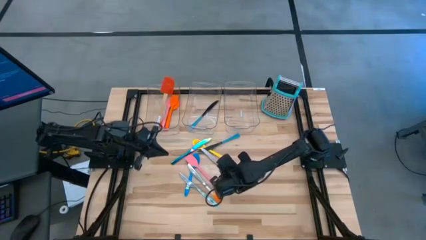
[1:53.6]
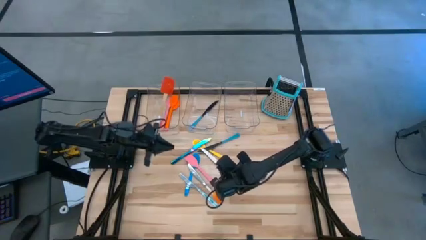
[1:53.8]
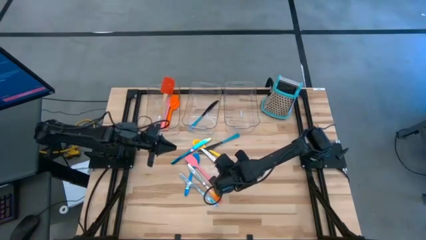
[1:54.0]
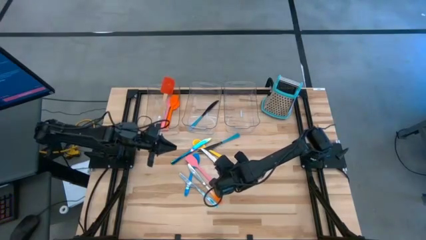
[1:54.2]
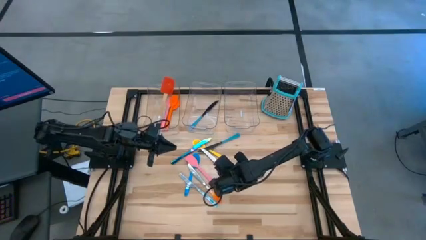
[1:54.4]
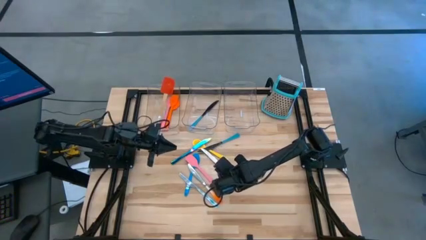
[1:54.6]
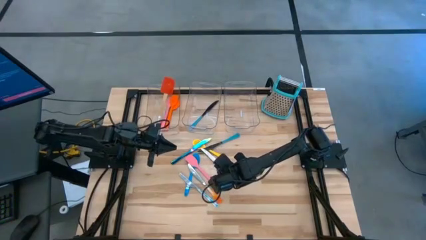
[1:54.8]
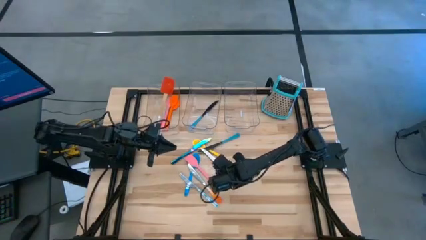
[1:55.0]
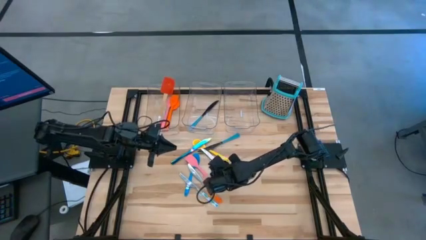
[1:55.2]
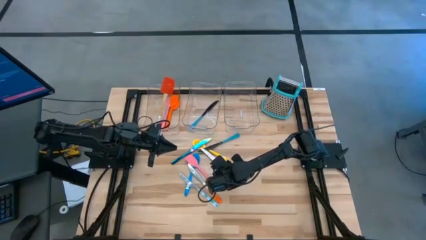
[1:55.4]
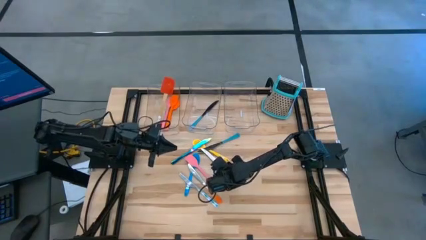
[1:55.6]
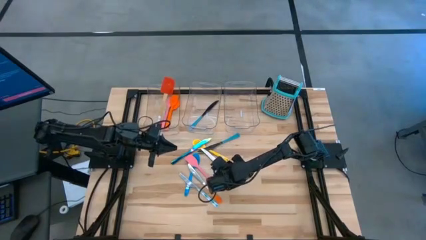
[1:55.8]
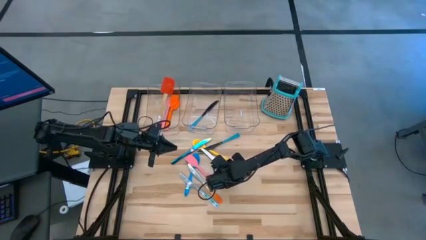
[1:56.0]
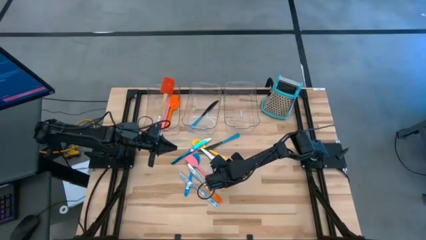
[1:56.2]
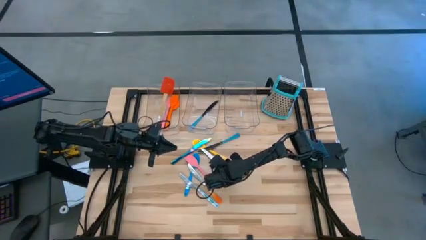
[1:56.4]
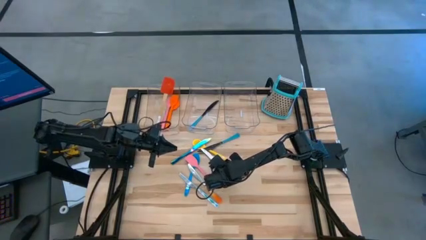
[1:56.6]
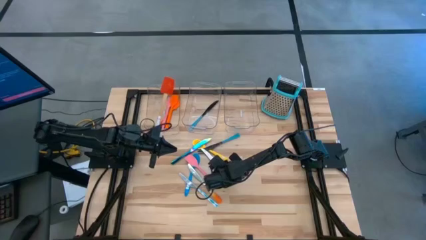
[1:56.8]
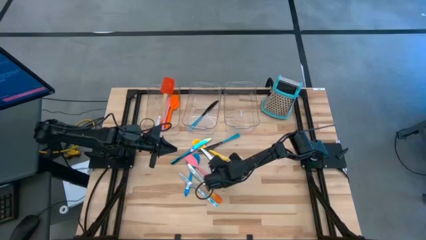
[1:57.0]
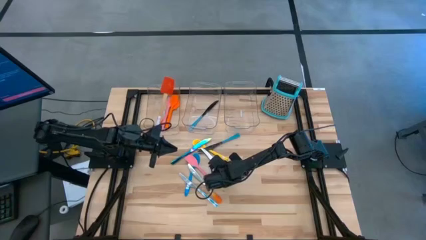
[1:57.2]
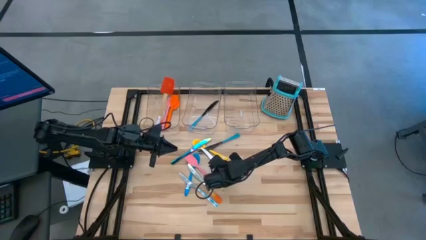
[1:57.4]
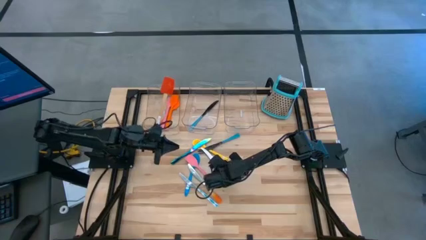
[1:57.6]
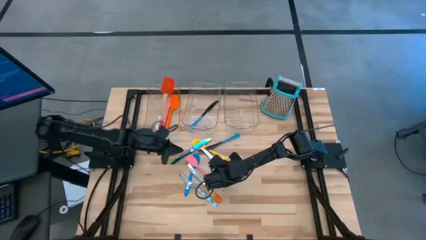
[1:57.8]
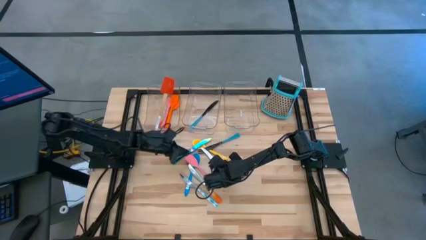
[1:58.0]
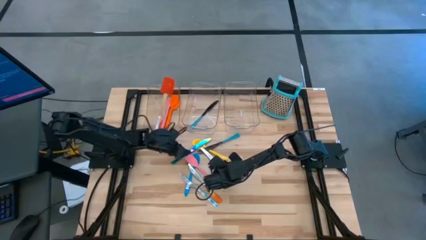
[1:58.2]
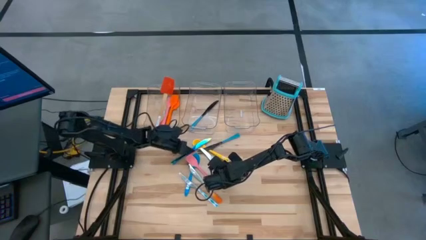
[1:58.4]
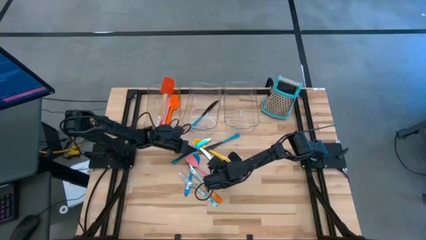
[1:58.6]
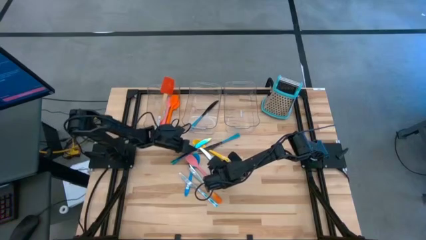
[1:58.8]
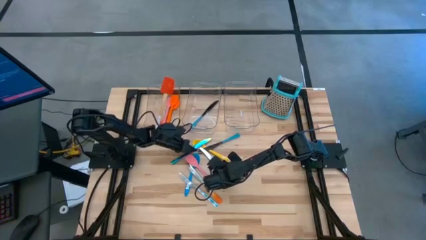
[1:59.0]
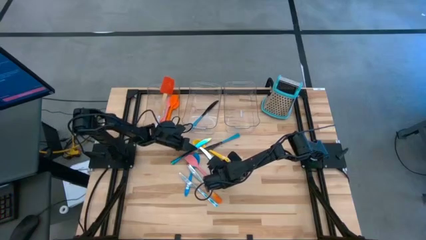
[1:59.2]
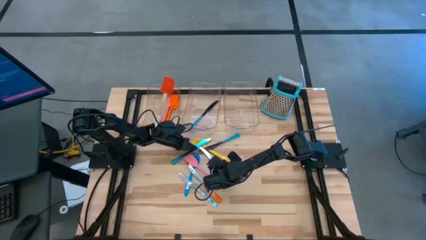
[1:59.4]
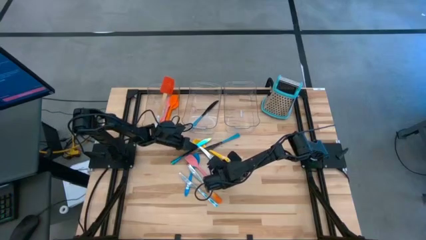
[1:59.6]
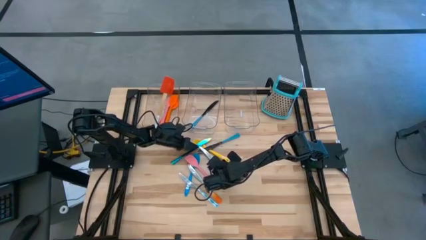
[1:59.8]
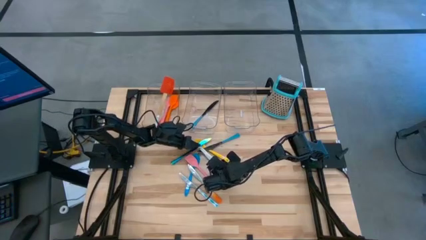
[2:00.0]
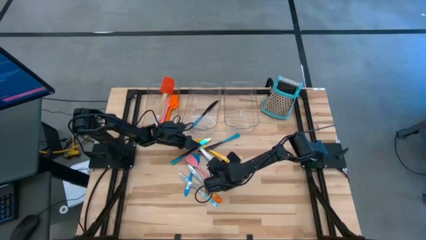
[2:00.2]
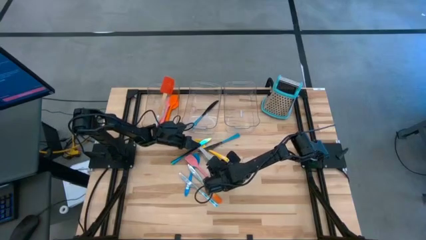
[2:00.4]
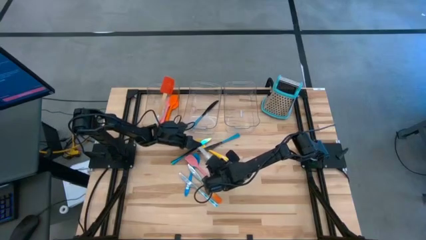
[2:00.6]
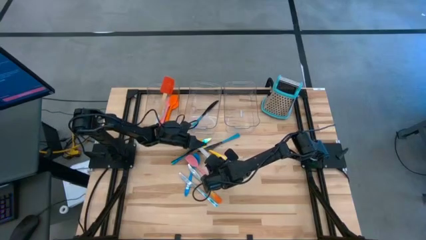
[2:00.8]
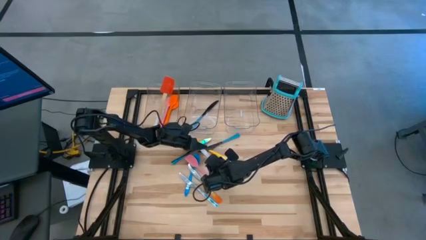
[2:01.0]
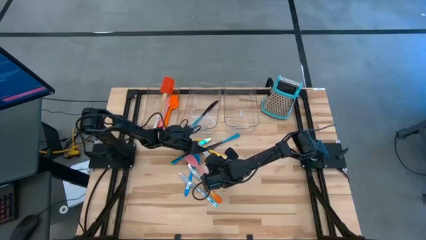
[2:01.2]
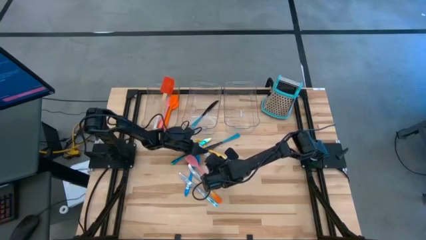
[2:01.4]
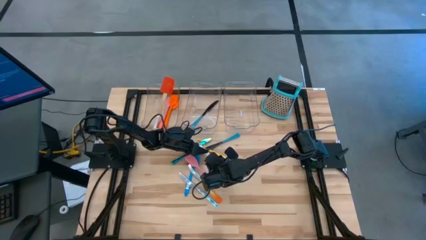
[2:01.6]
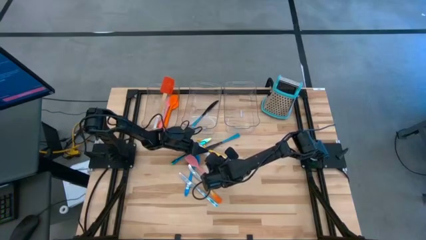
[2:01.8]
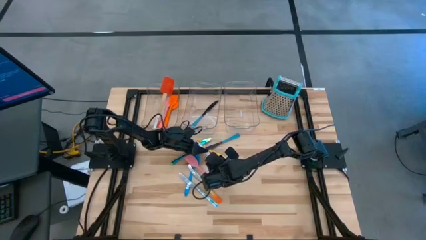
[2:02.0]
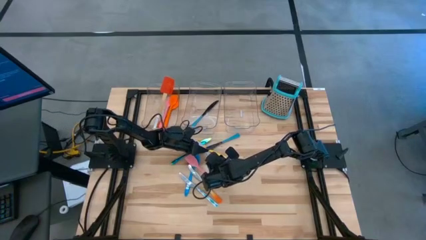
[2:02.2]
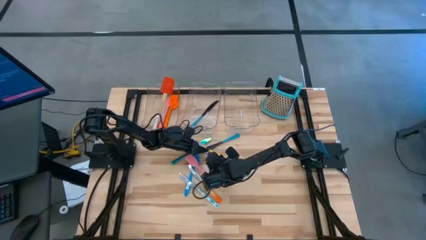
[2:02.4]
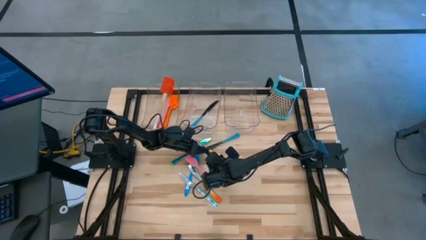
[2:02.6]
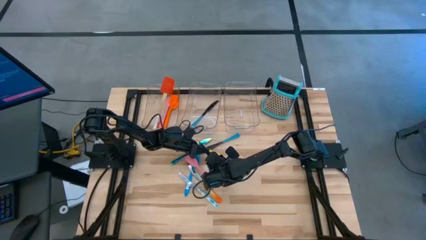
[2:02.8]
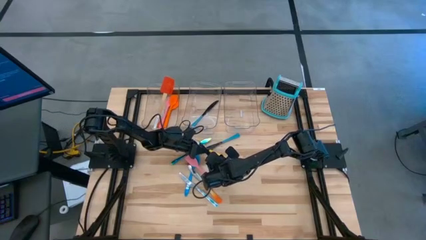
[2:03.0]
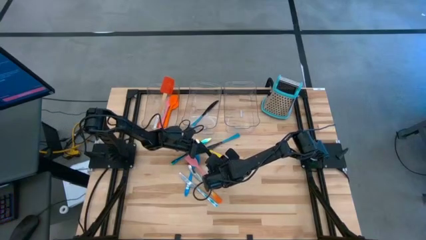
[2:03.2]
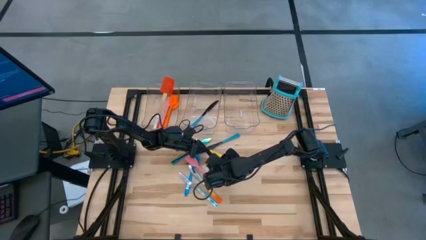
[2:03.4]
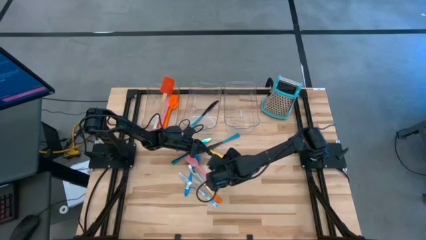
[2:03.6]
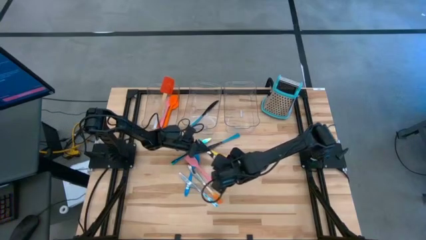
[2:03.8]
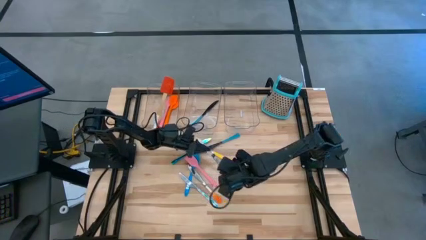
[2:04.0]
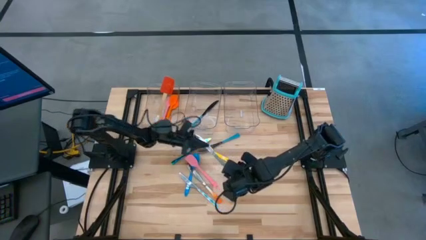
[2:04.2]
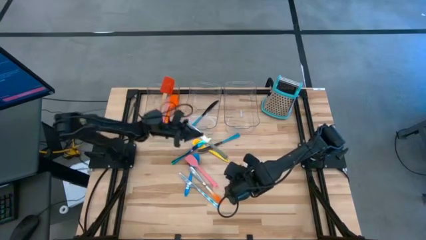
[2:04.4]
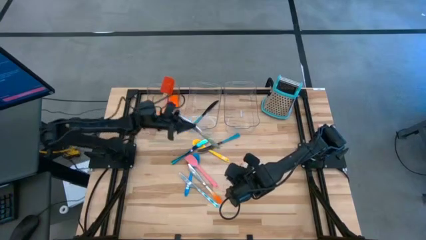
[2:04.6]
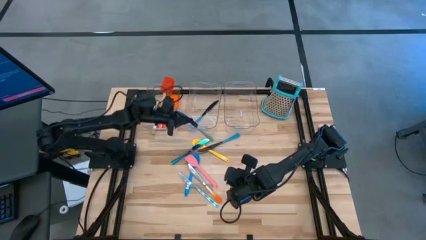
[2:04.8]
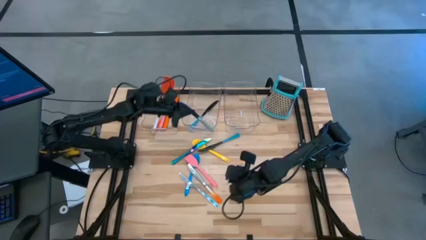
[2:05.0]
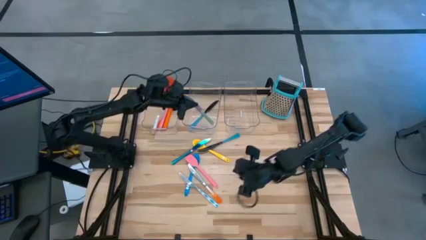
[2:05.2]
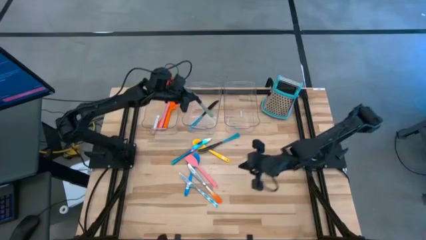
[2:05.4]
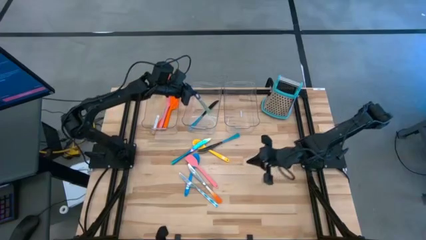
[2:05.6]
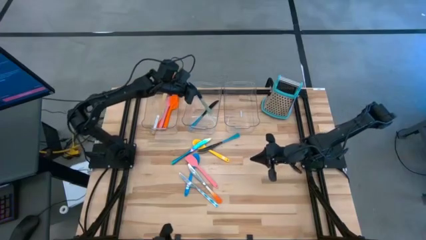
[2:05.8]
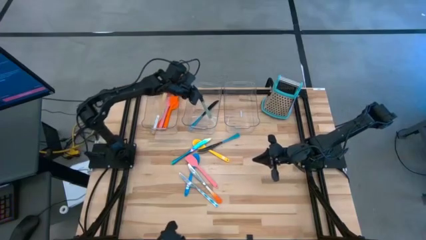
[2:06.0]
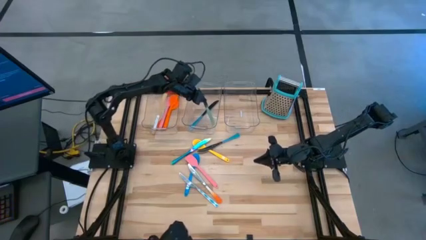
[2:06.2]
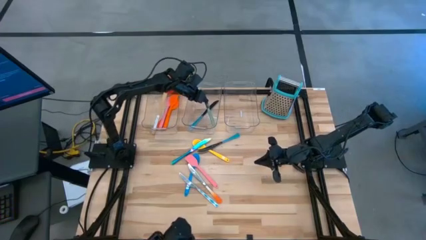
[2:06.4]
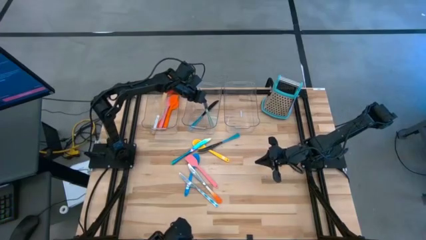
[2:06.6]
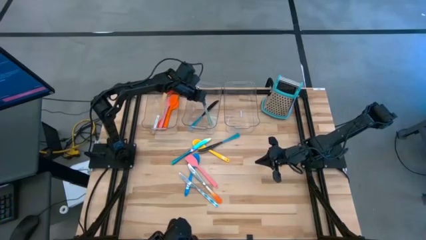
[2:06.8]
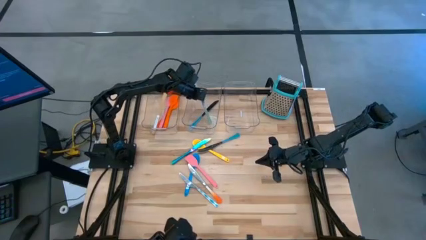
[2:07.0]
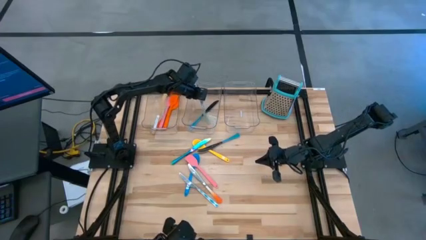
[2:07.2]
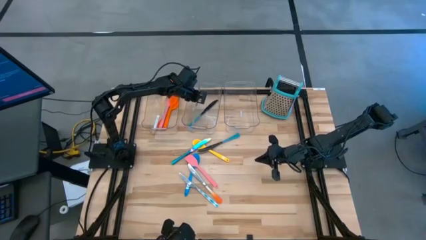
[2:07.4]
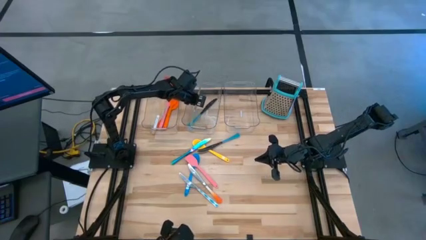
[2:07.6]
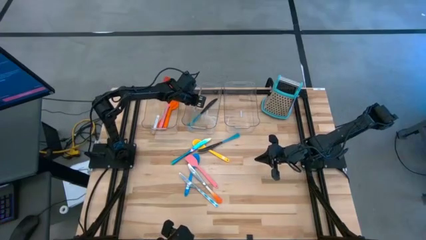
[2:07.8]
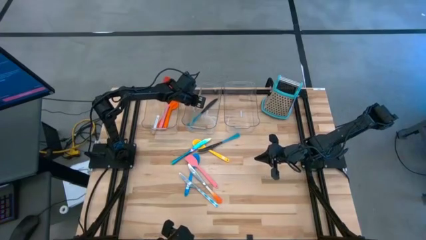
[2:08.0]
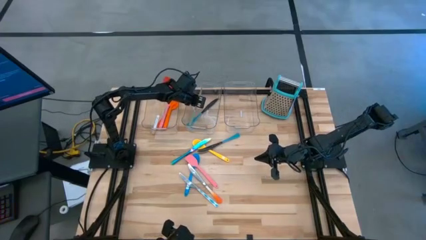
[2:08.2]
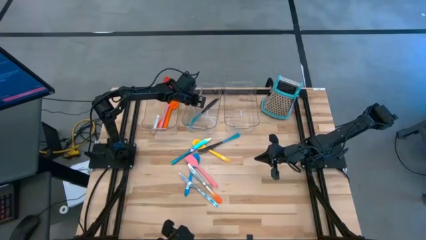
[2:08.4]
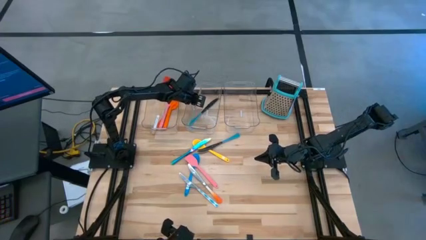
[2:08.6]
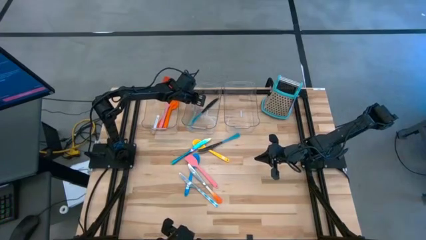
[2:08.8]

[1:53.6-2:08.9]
Task: Pick & Place Kitchen Items
Put the green knife into the middle transparent bin
